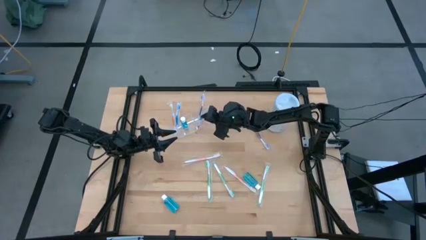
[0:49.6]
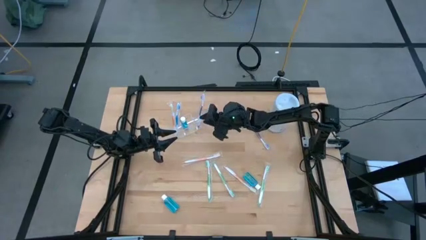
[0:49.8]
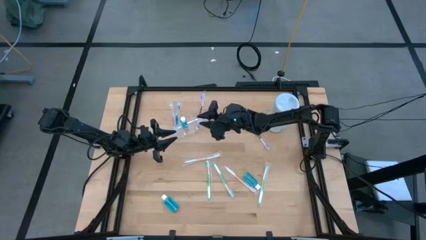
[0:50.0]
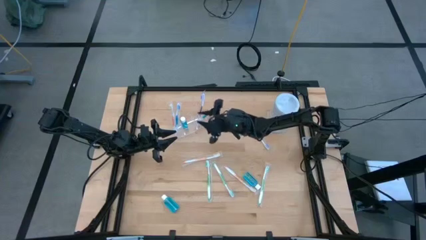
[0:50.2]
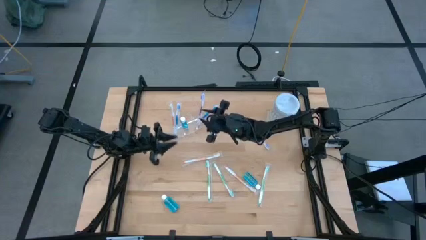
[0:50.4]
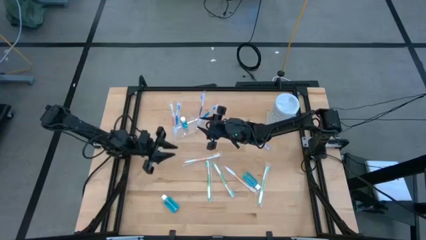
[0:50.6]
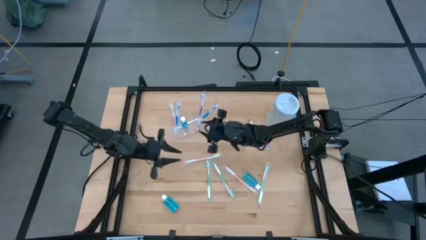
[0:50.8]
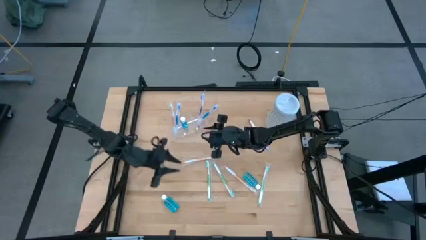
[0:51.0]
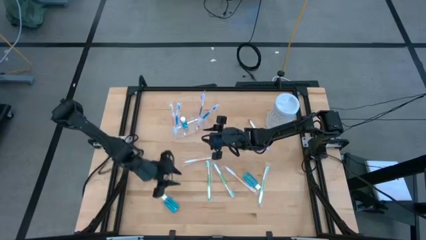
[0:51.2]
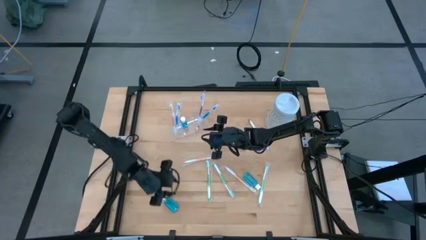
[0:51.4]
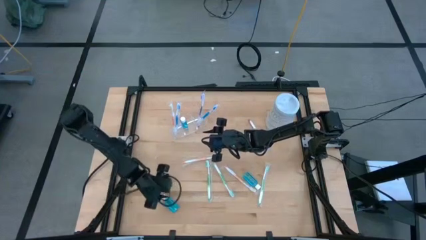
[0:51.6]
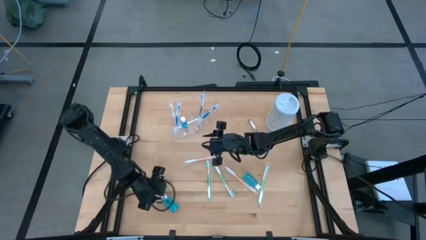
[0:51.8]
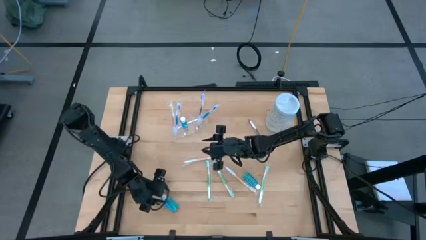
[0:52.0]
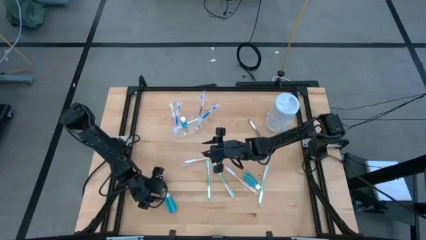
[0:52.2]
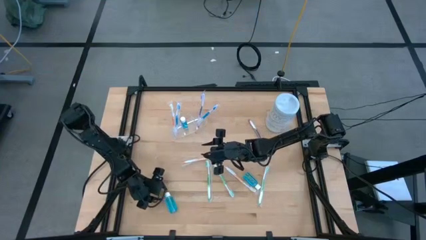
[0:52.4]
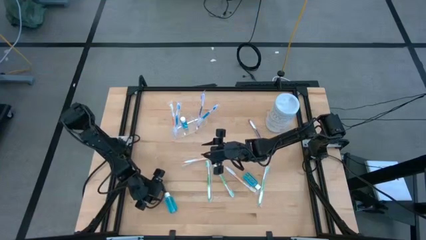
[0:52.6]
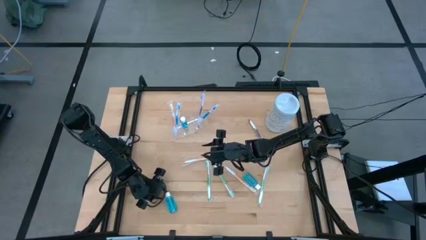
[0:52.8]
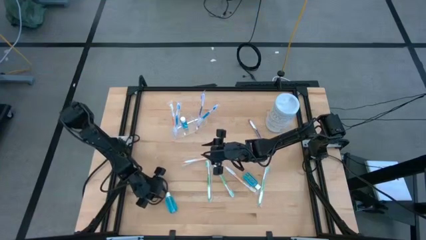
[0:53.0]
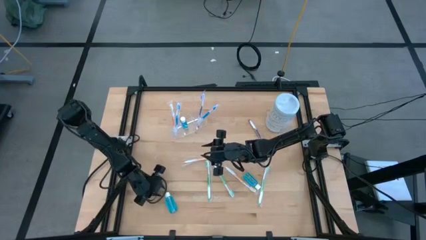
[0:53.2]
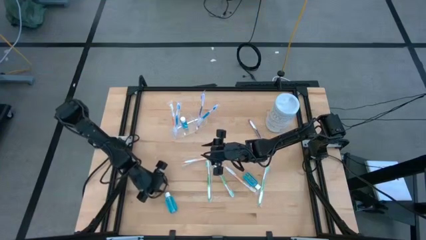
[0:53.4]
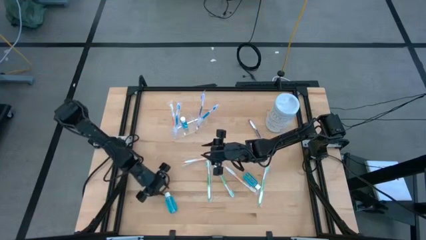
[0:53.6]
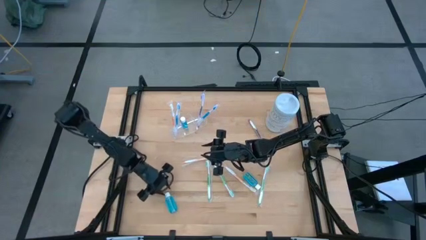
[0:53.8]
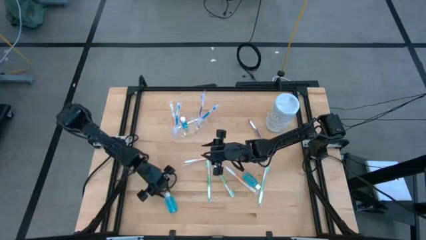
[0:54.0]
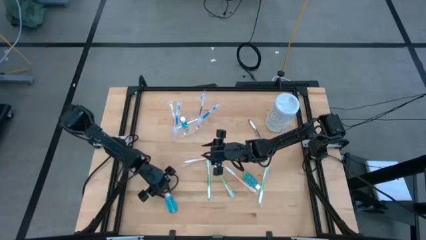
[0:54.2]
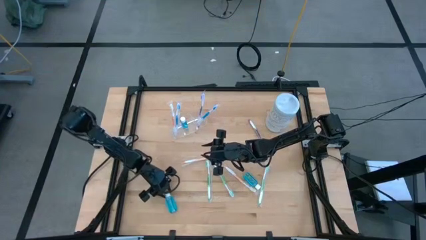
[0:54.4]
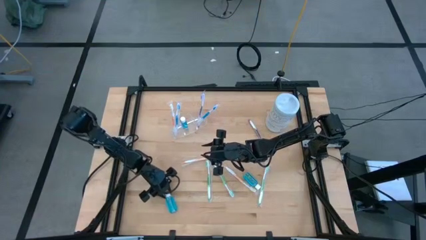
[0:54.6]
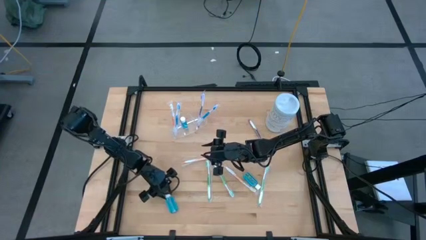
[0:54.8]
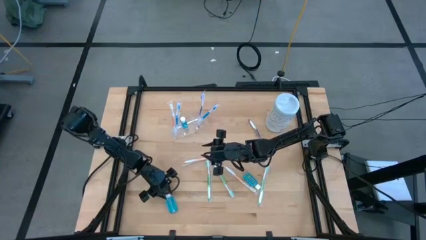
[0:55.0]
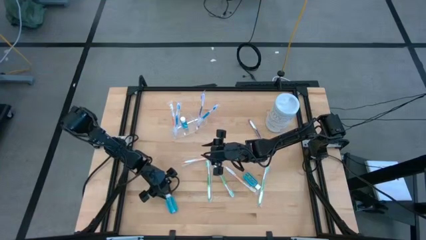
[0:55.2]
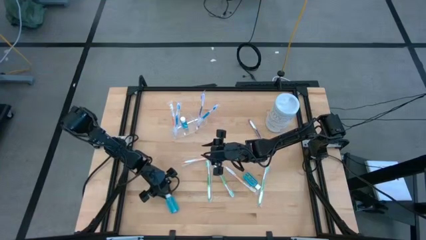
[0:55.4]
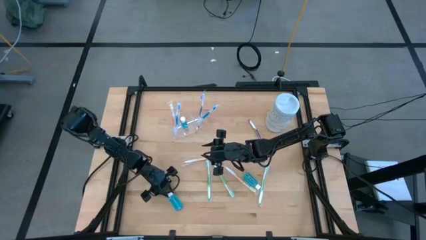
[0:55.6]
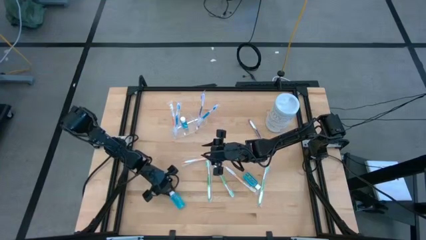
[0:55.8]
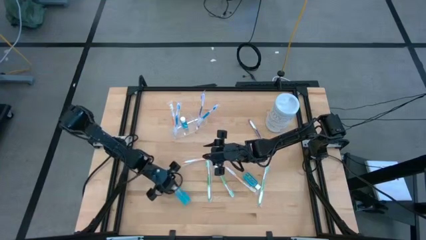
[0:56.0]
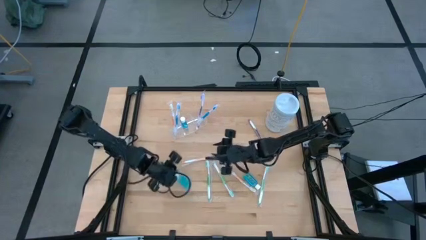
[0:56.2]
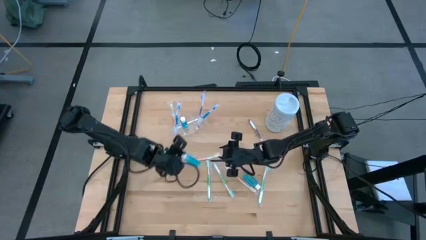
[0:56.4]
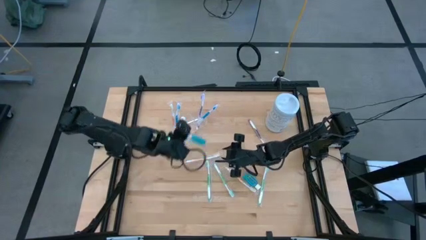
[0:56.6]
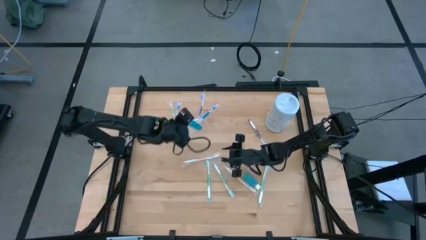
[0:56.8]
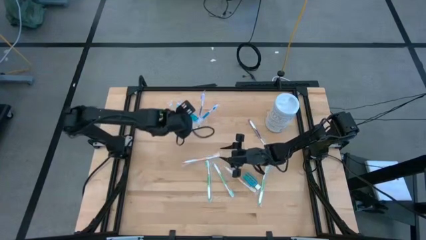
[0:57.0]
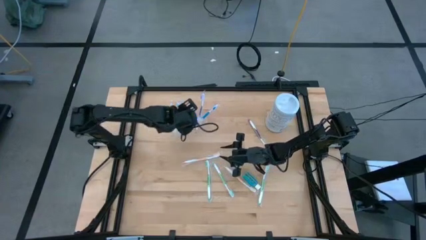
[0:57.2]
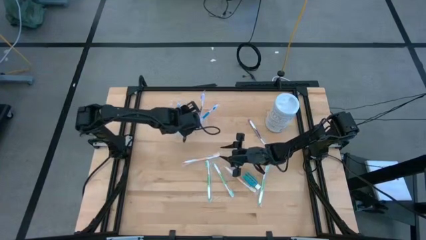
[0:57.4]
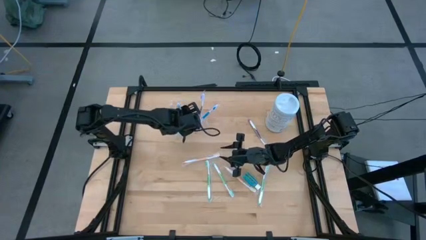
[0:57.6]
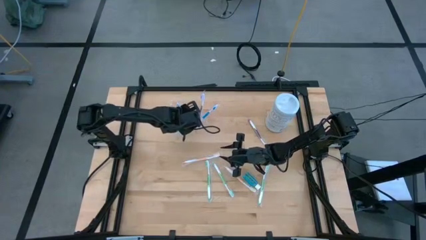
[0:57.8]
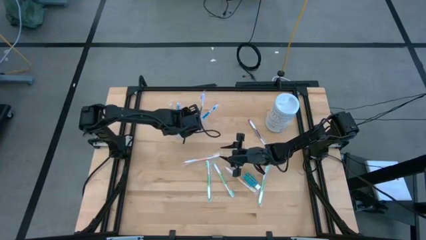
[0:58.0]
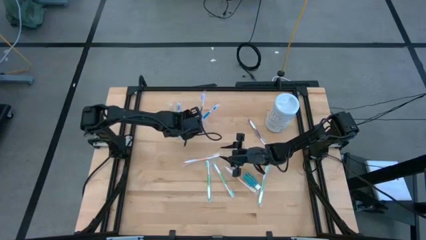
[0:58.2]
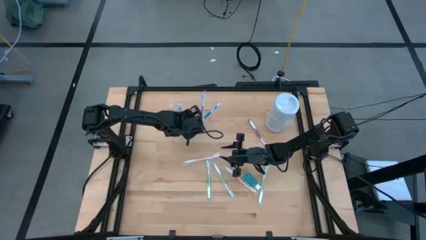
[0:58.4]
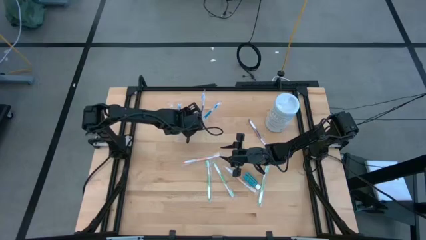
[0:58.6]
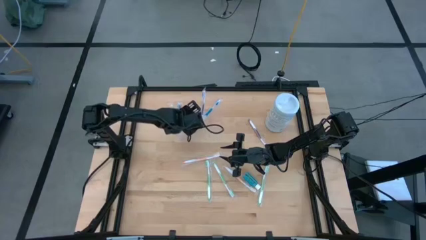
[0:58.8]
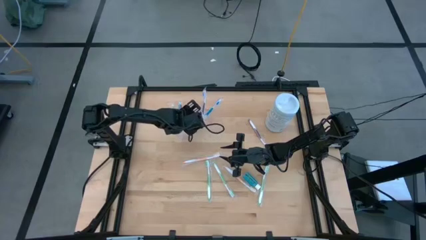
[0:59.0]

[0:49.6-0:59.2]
Task: Pick & Place toothbrushing station
Put the left blue mouthwash into the transparent organizer

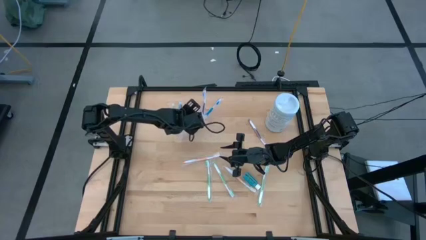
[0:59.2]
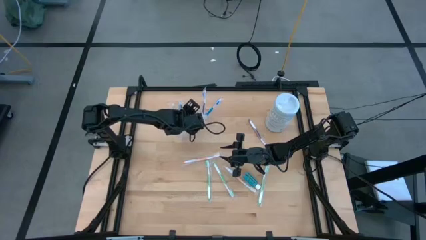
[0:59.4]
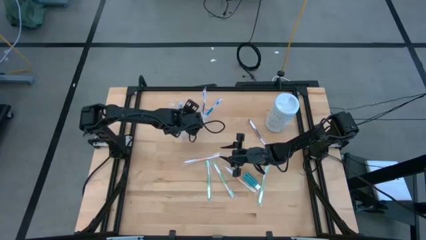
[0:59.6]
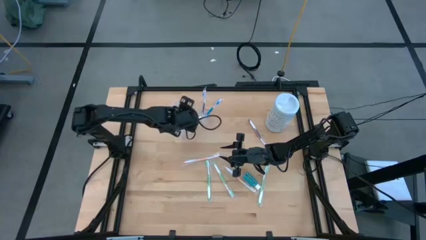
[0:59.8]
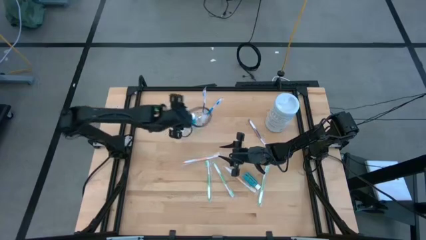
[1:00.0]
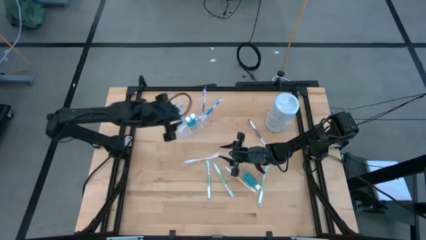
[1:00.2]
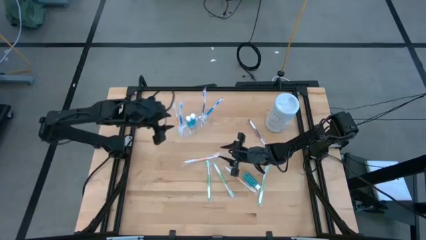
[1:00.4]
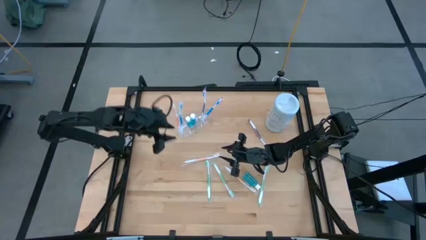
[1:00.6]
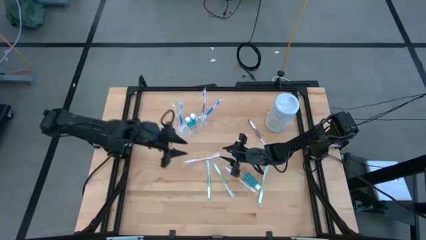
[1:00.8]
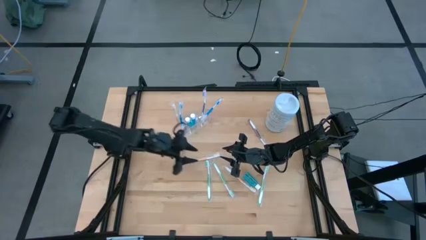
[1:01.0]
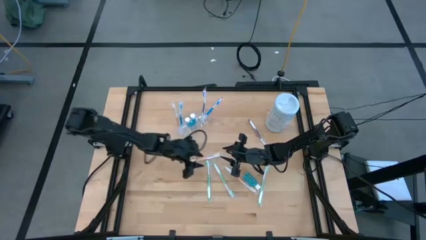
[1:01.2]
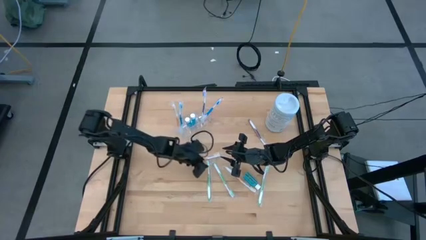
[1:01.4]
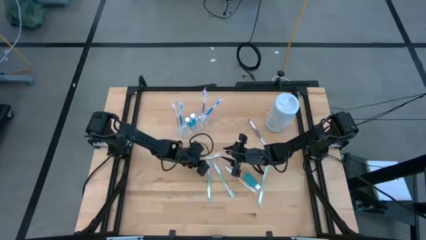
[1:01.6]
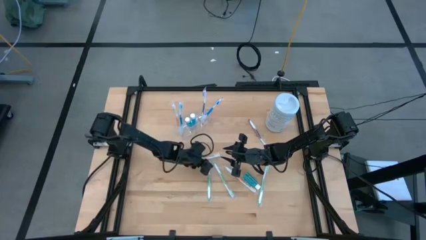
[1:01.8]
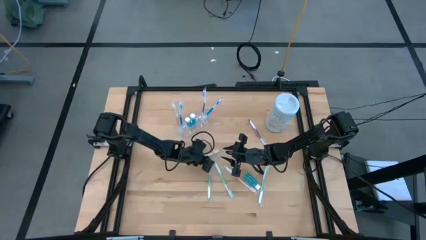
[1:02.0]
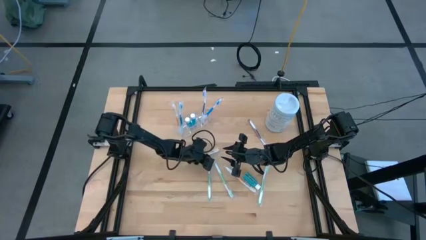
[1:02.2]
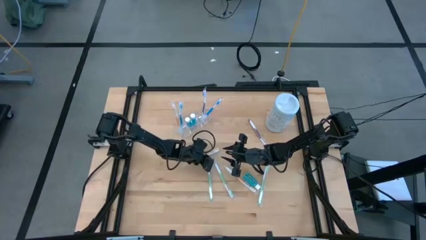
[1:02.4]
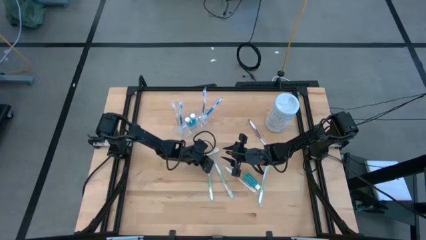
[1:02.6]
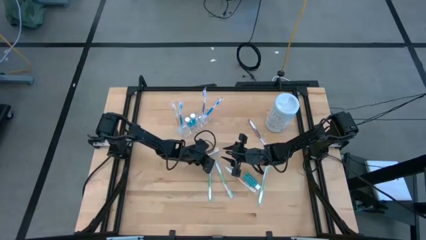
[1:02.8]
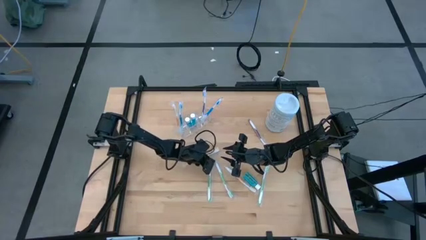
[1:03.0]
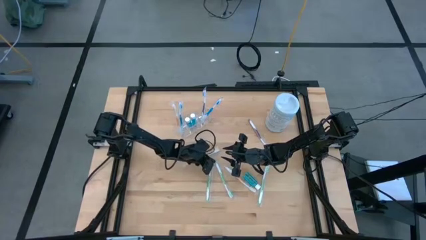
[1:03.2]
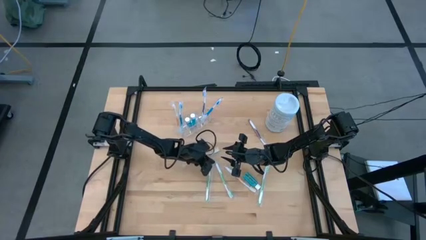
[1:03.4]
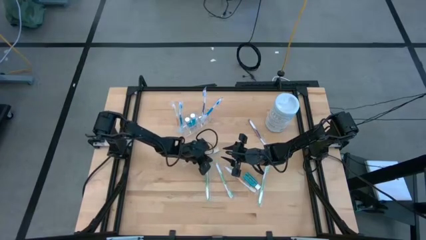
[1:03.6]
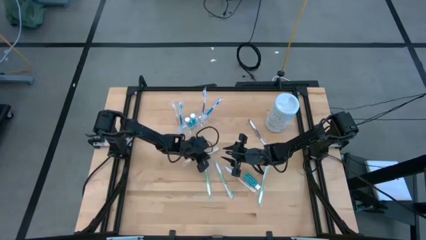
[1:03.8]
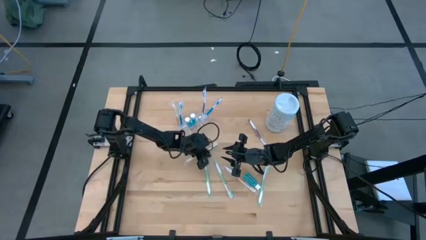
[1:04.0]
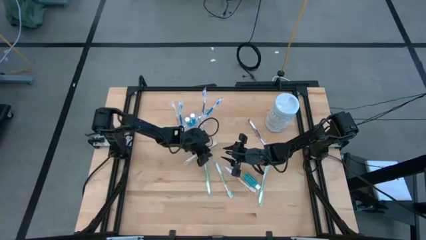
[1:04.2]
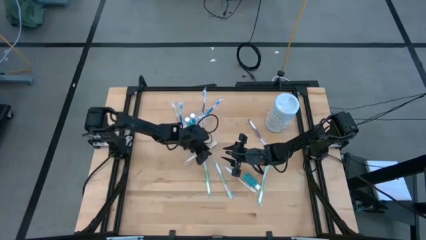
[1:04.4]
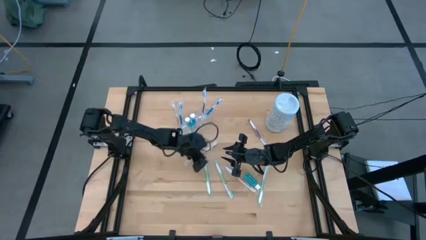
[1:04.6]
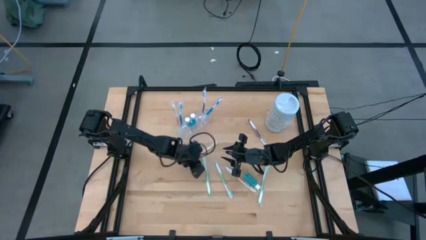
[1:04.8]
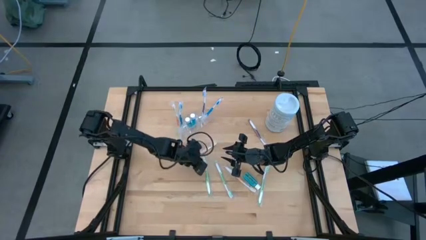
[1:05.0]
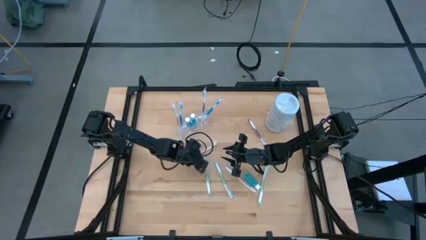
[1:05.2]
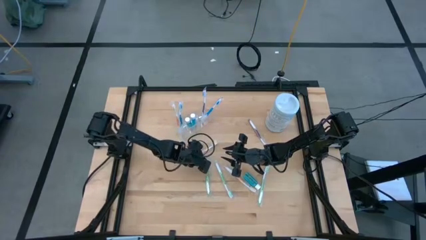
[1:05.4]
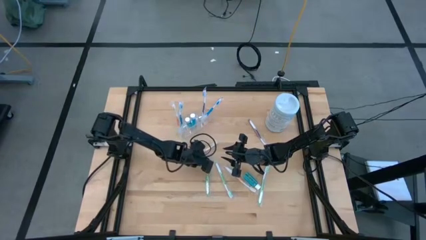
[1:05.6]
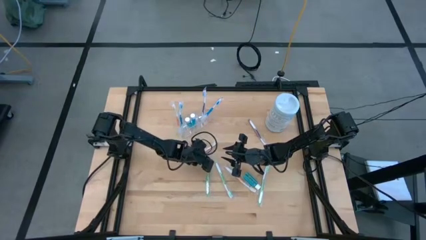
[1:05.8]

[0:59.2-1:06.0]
Put the left green toothbrush into the transparent organizer
